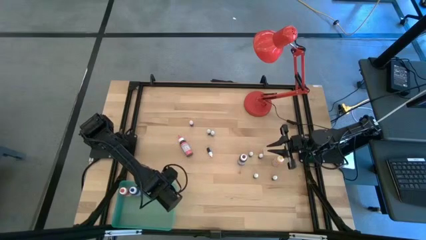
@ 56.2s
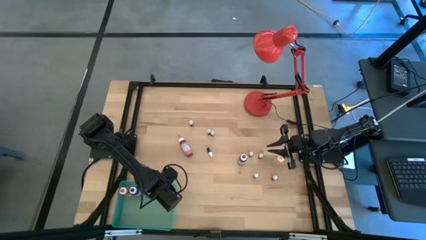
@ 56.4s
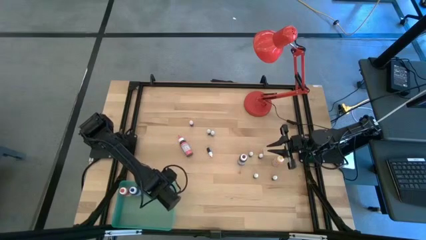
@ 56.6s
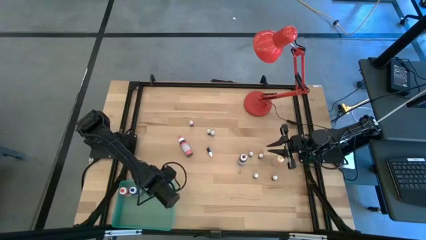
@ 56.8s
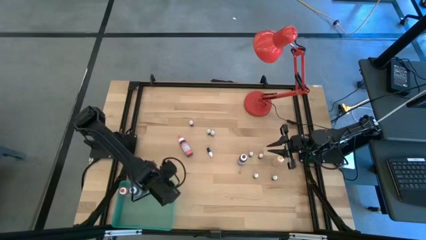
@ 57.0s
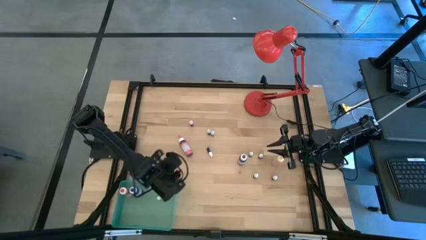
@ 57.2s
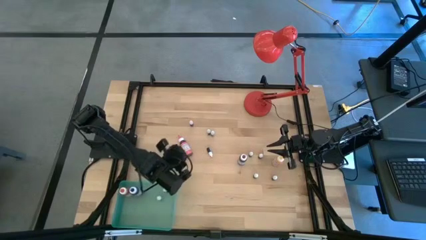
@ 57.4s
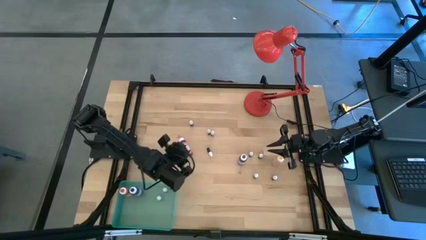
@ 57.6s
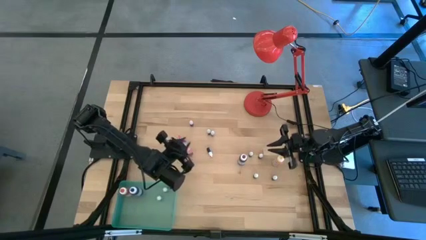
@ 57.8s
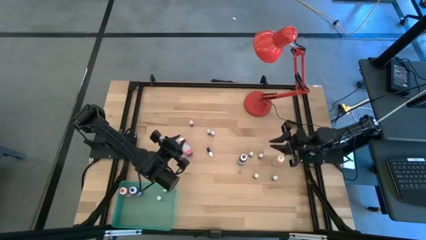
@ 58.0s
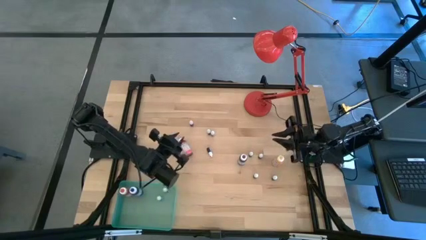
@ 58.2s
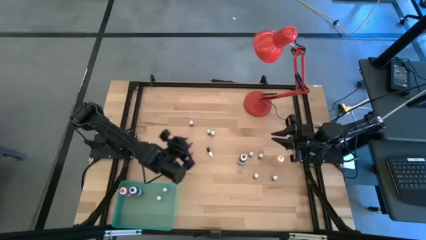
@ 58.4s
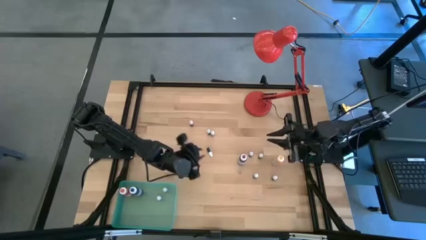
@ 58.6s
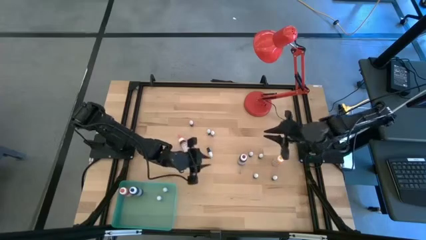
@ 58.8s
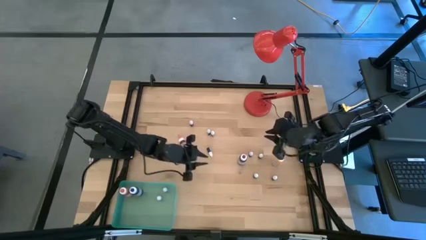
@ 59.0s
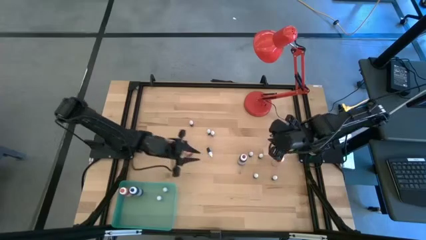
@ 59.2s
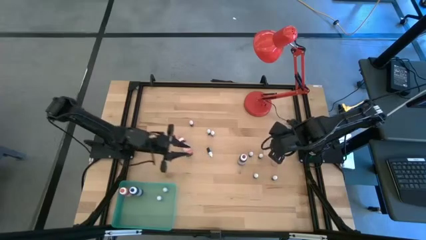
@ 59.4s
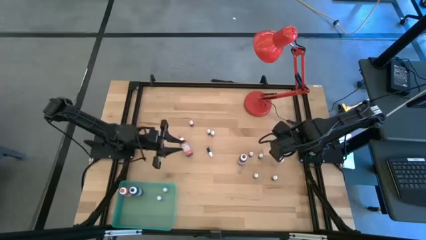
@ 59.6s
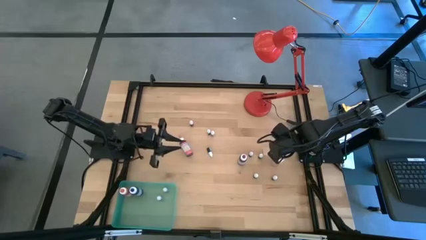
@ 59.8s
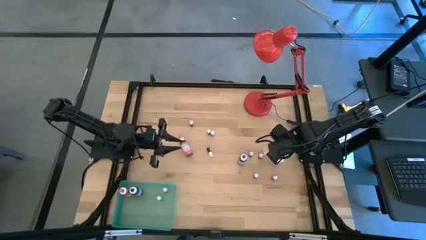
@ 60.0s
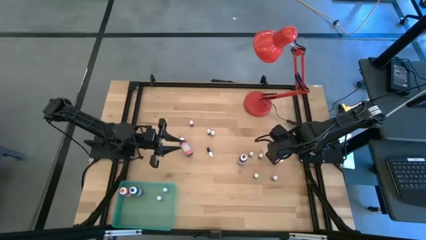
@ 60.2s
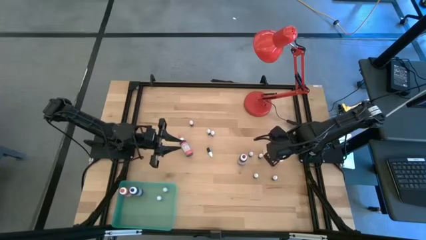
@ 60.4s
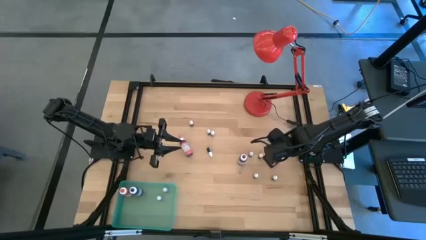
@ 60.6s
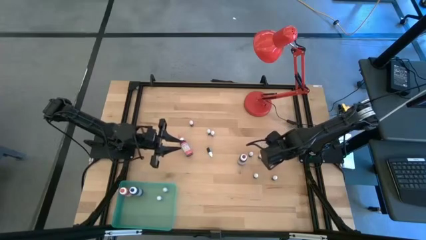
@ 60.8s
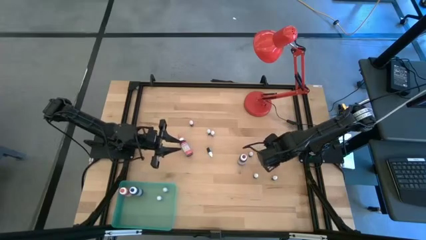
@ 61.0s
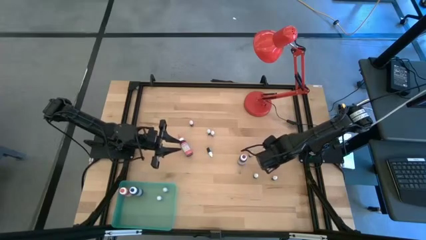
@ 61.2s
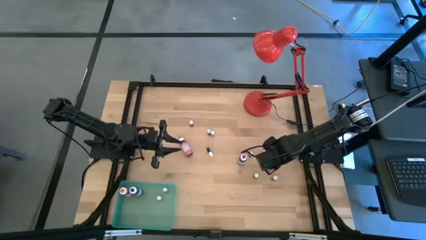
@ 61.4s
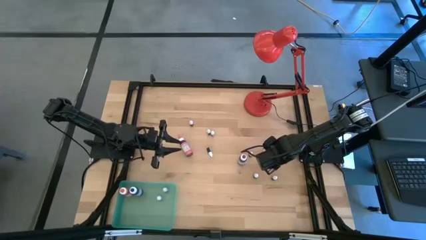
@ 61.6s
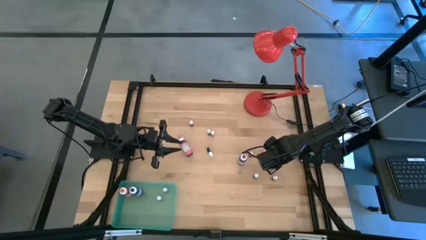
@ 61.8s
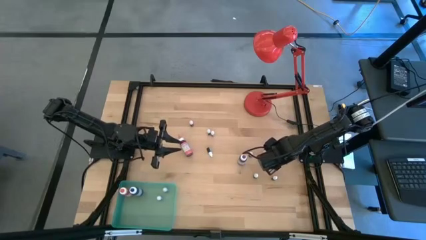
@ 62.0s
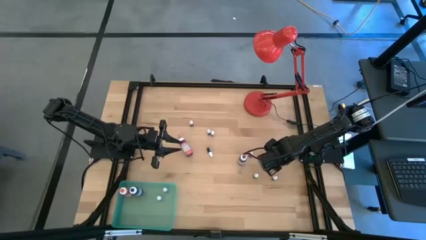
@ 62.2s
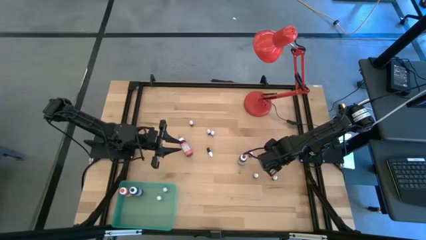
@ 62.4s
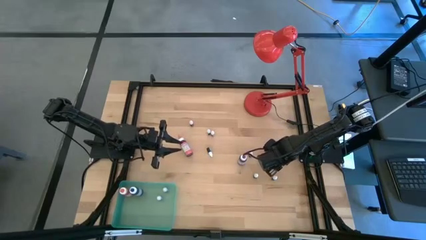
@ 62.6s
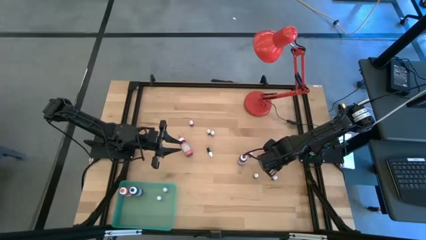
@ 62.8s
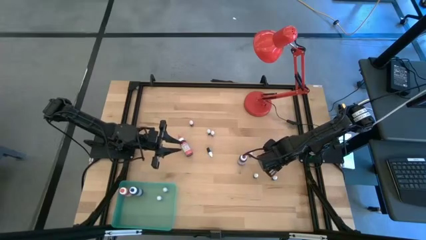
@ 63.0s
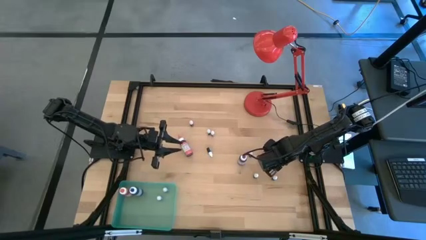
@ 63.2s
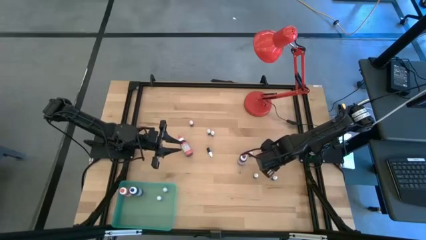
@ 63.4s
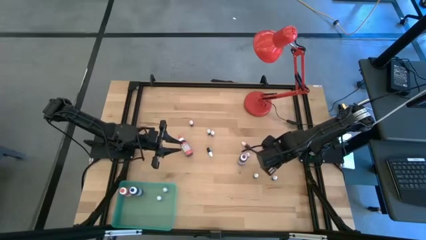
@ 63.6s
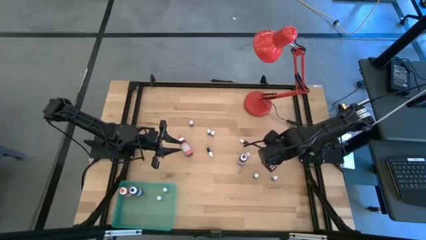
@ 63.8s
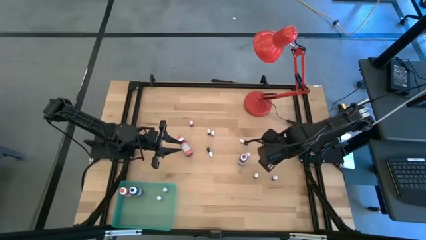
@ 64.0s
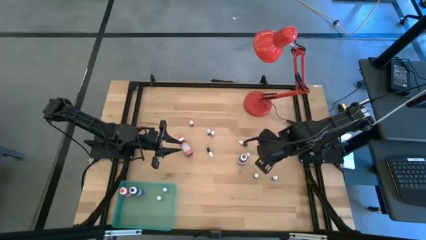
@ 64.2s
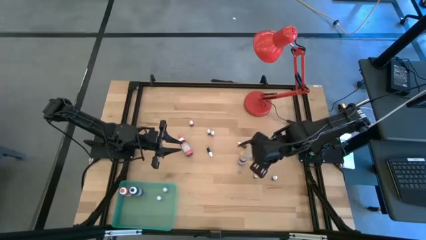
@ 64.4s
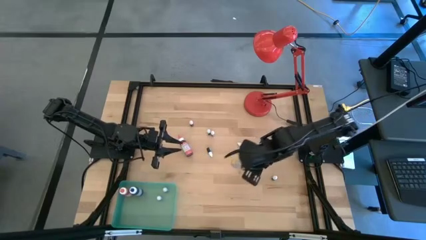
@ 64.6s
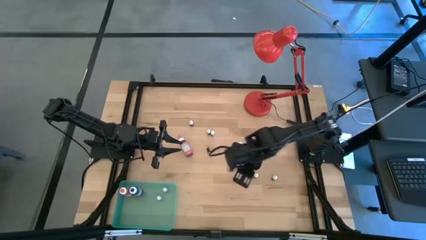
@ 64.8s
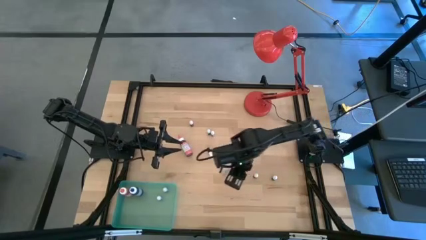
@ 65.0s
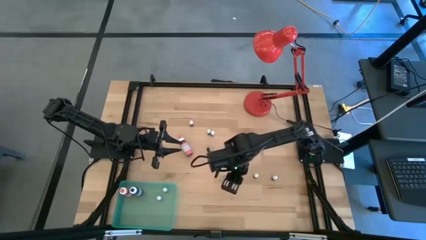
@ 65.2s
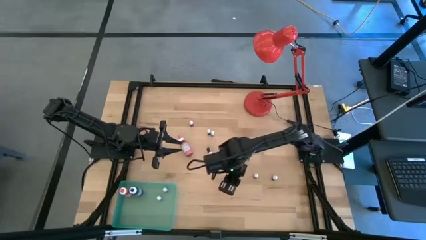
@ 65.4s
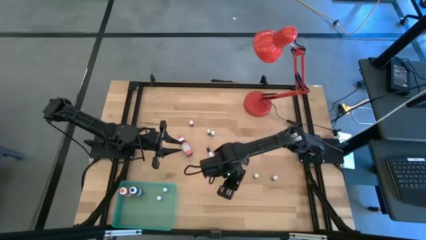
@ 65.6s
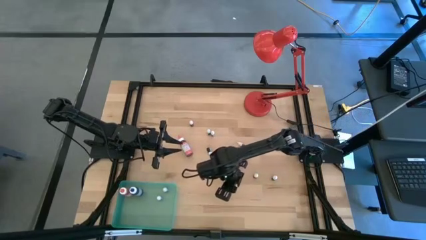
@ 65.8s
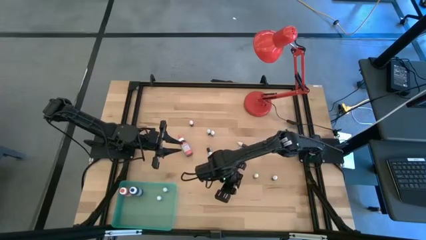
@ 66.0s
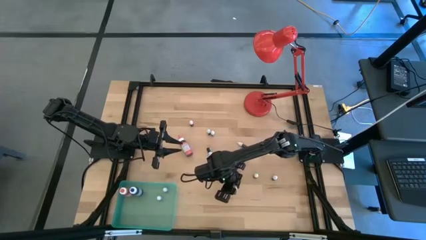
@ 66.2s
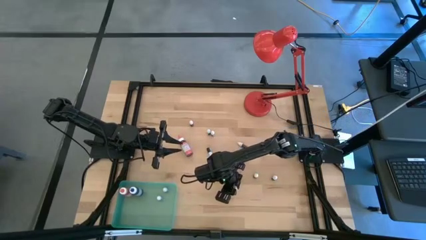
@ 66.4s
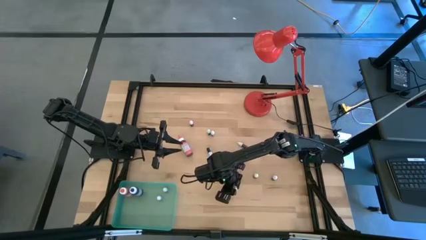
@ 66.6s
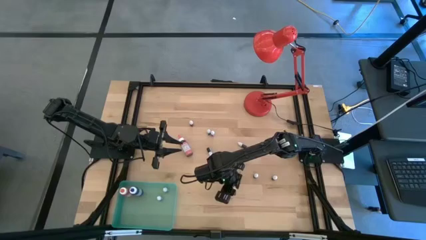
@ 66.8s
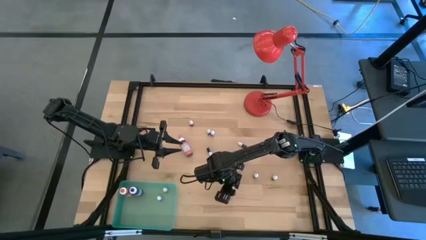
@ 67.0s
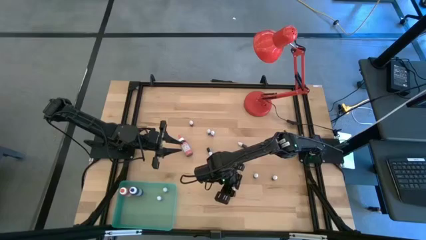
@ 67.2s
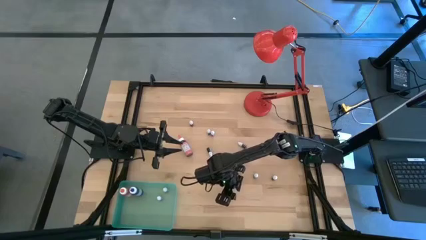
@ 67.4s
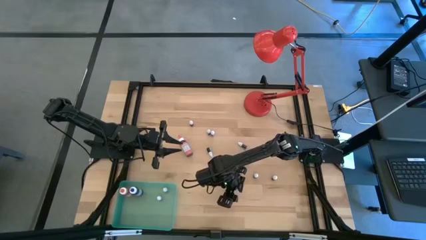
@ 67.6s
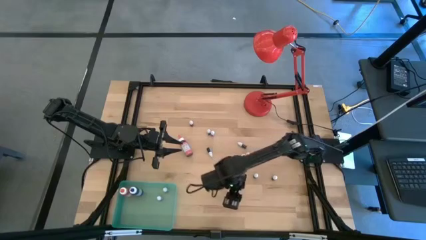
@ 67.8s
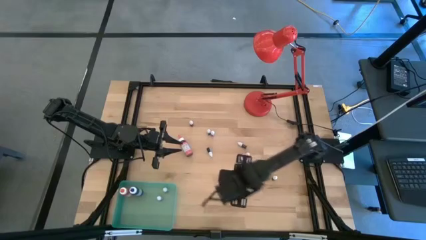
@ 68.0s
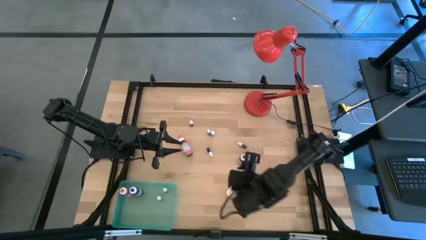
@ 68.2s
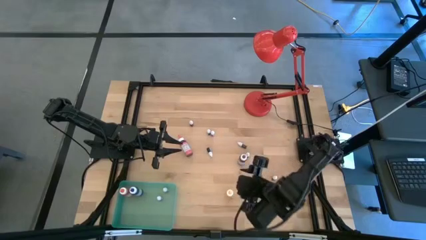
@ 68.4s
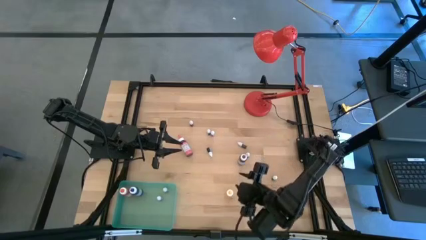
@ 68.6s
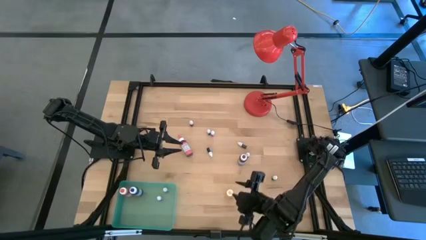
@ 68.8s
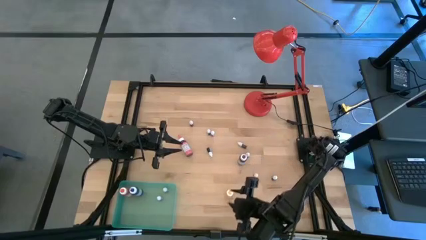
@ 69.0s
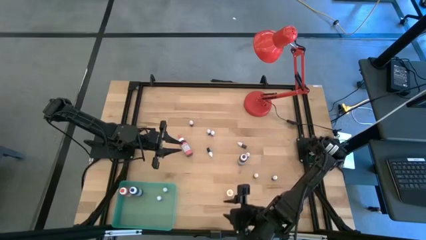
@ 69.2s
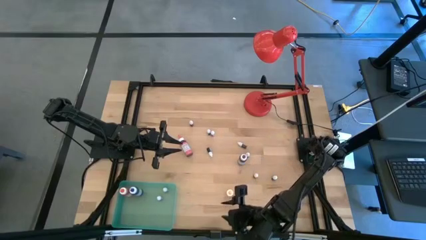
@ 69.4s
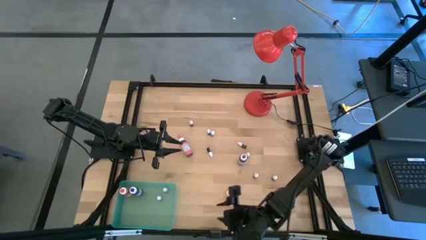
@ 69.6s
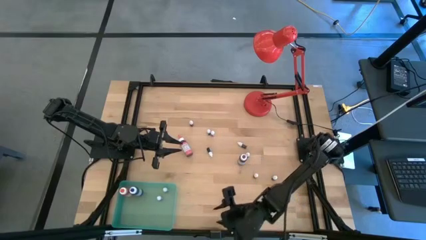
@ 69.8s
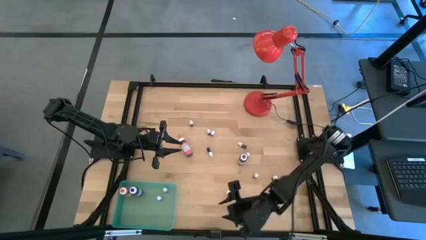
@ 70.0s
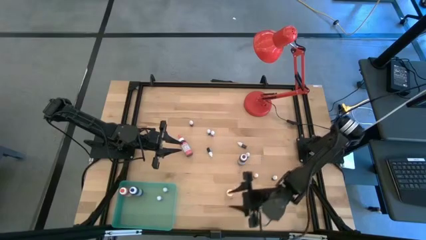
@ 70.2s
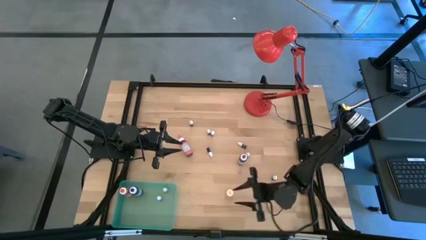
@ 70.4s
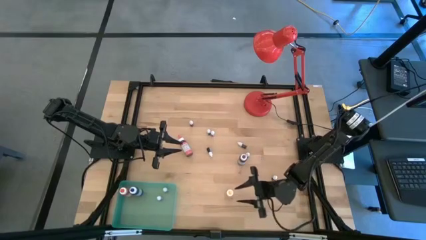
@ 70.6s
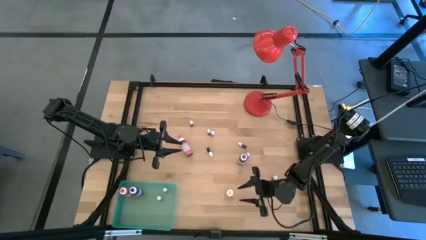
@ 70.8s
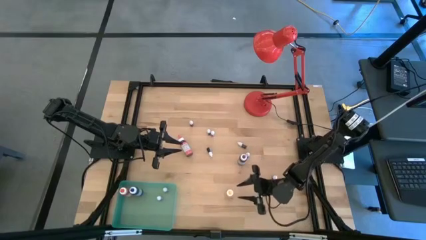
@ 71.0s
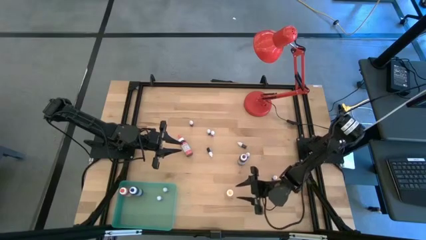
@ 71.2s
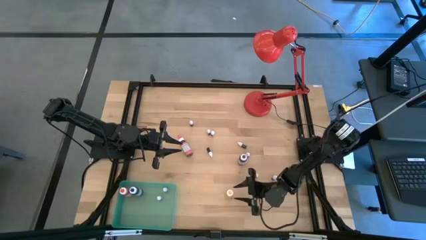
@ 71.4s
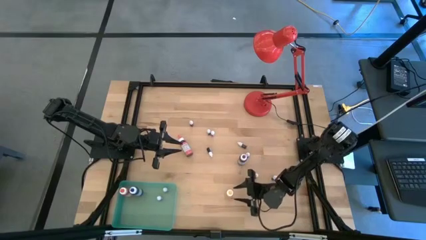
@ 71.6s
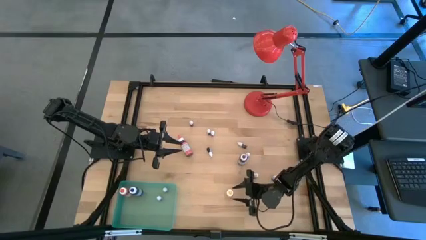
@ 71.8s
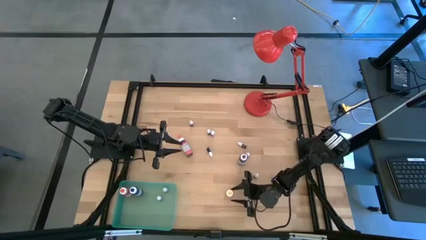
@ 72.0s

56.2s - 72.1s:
Task: Pick & Place food coloring
Put the yellow food coloring into the blue bin
